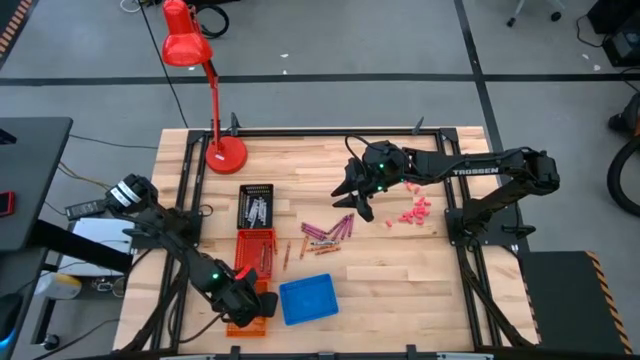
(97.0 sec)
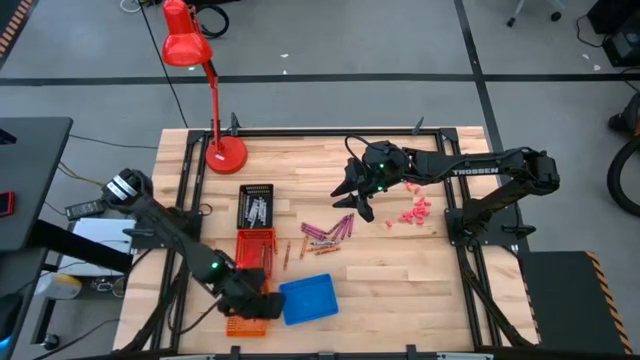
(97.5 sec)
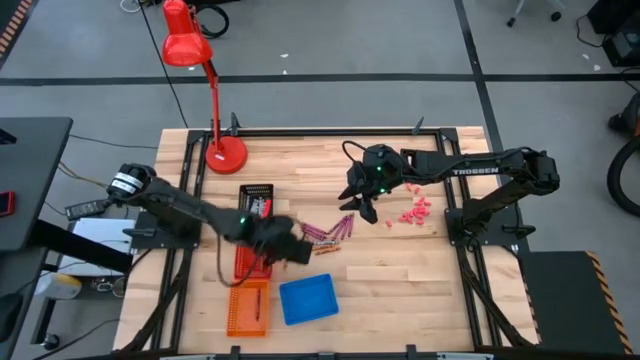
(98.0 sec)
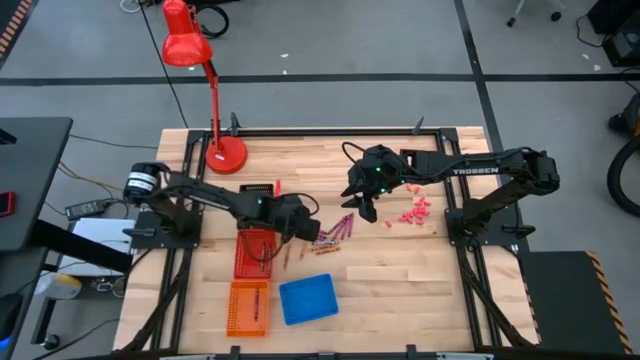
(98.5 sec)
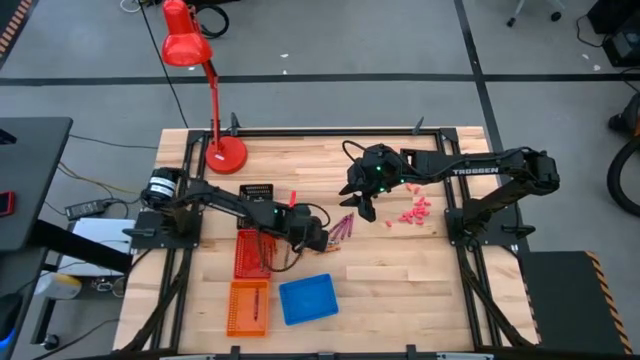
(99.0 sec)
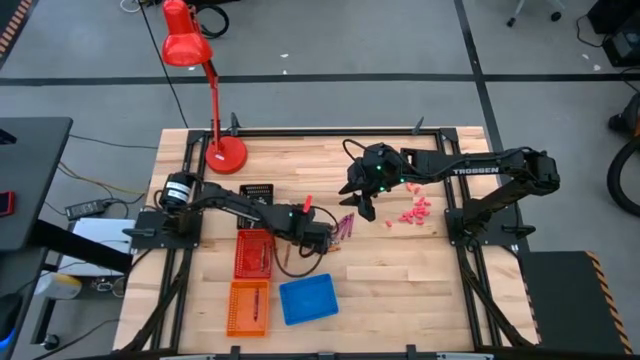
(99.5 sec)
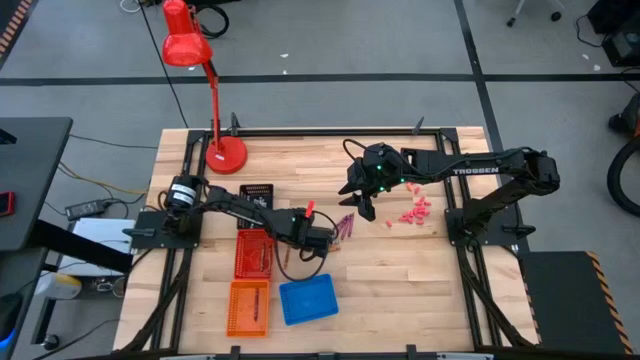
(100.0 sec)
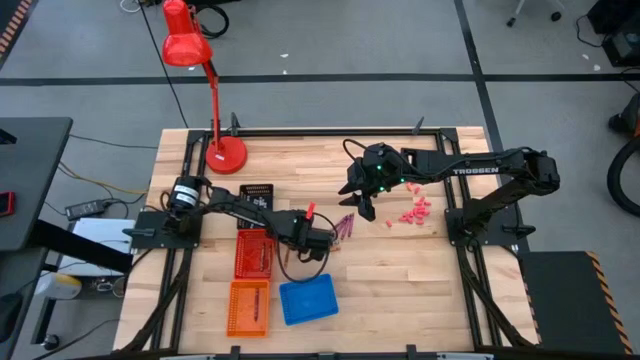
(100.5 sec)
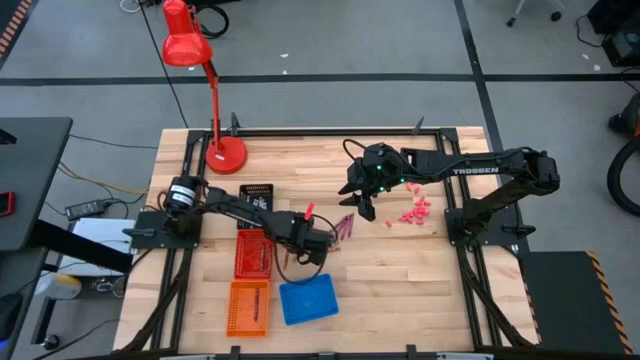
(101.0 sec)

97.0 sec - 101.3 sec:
Task: Sort crayons
Put the orange crayon into the blue bin

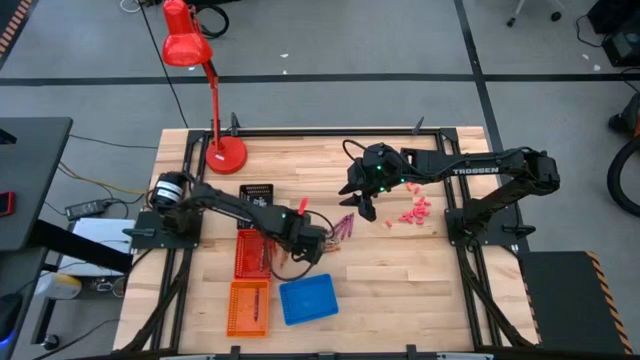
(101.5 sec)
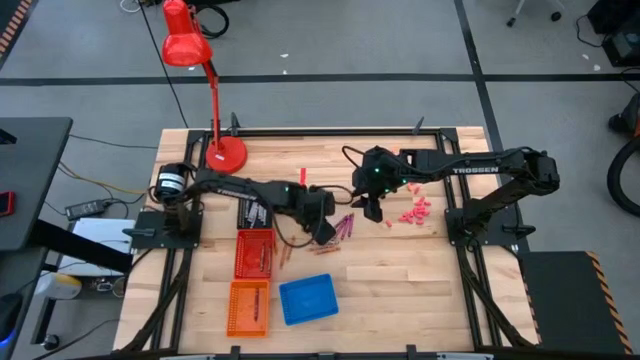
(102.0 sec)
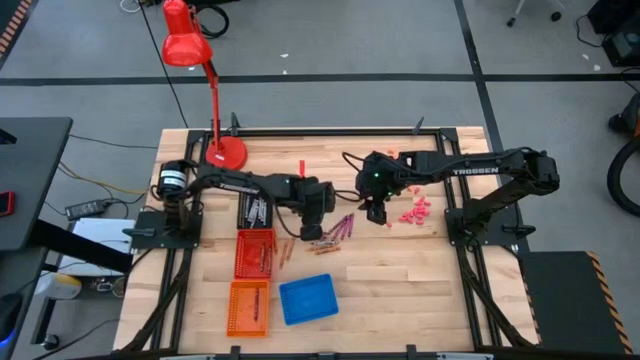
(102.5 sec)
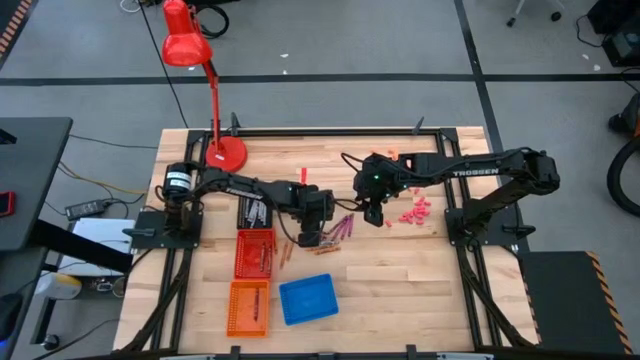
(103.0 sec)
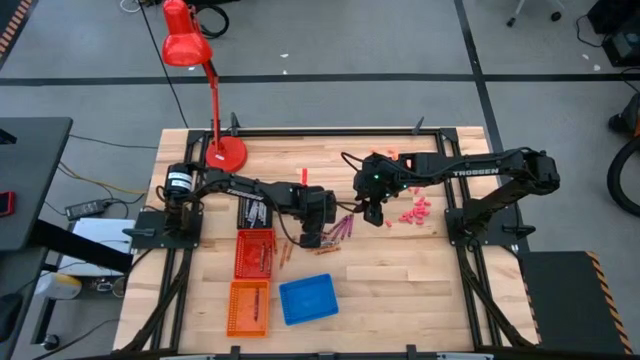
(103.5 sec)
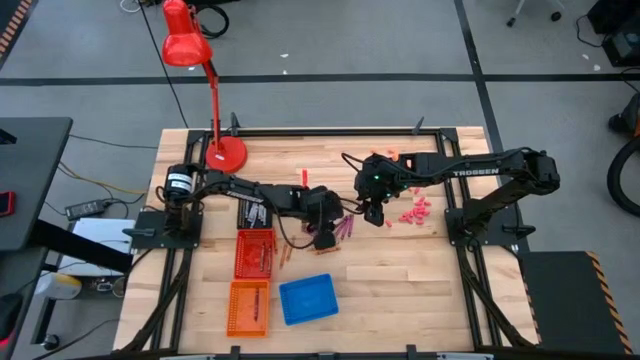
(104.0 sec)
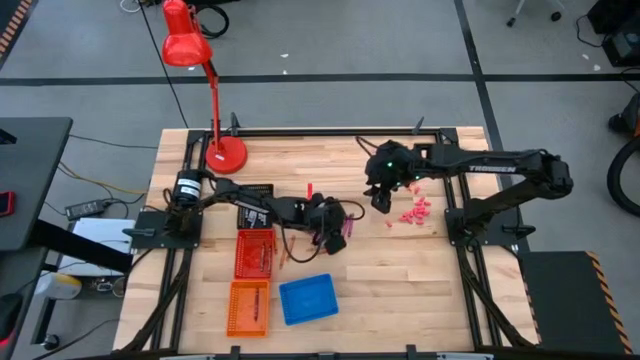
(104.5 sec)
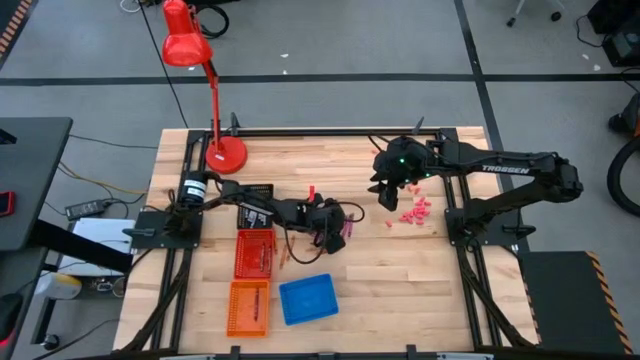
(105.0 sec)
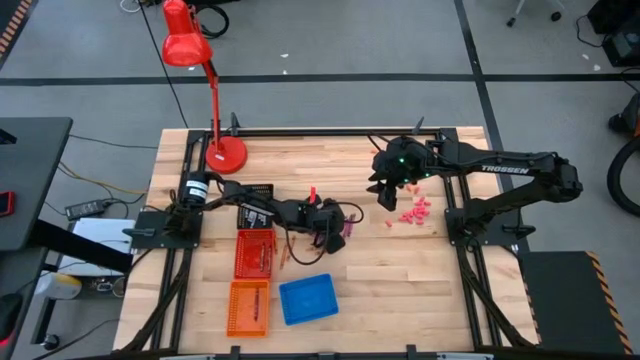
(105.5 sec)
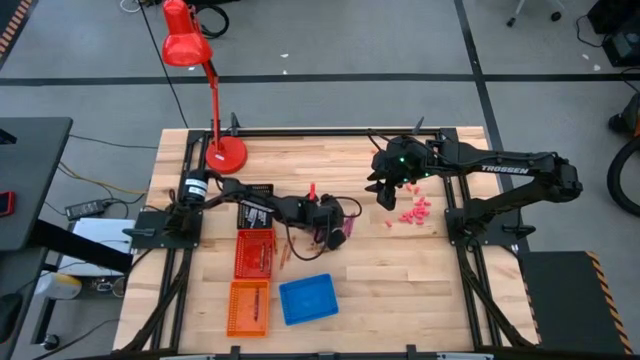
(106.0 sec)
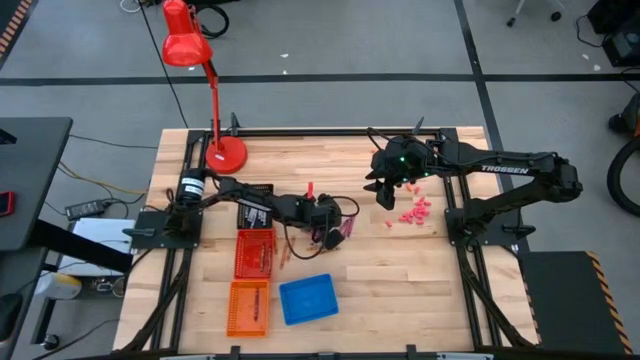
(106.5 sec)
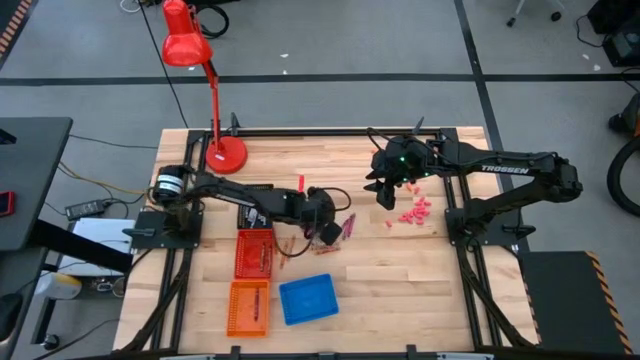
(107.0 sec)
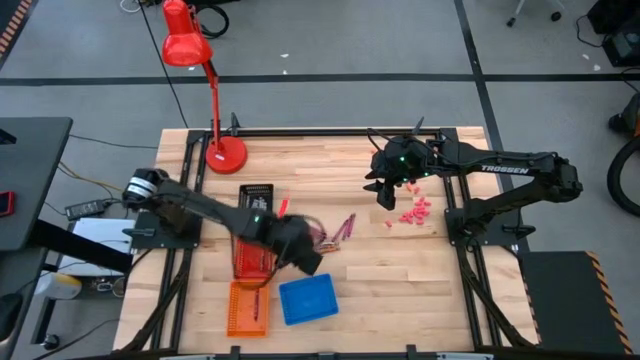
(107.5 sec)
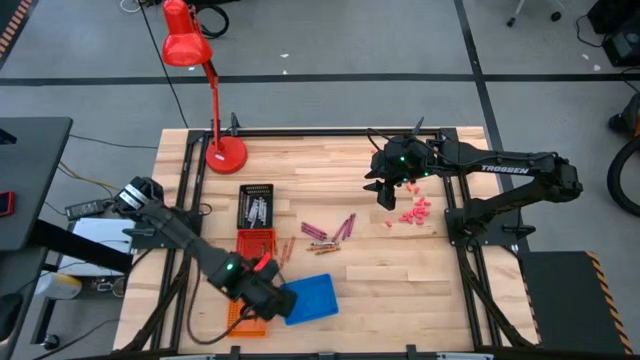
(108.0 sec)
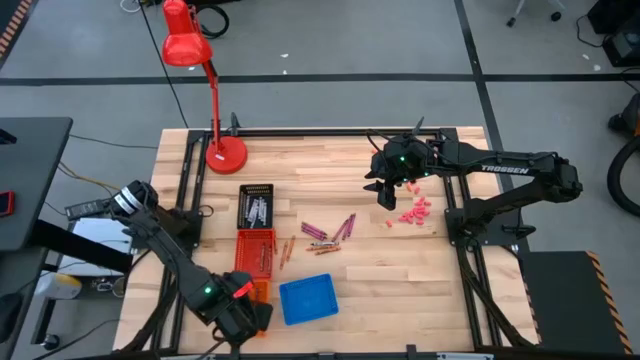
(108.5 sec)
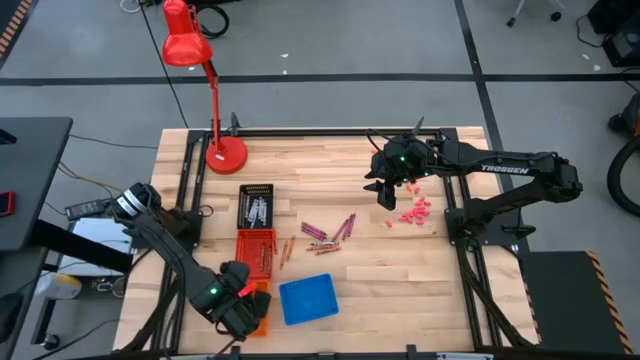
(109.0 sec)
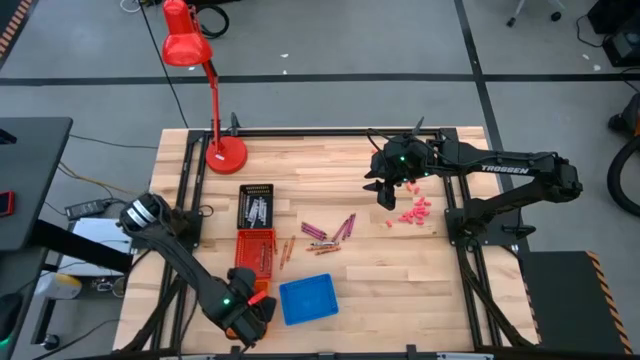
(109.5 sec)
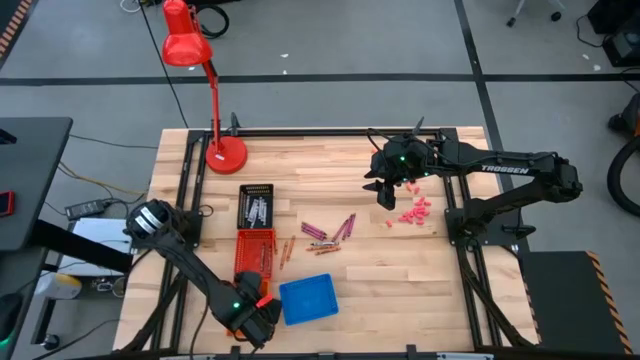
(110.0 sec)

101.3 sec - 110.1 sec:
Put the red crayon into the orange bin

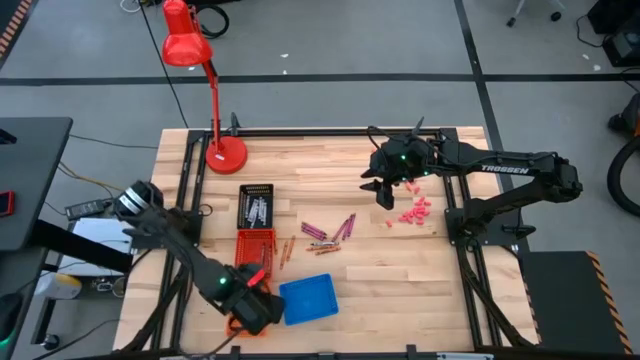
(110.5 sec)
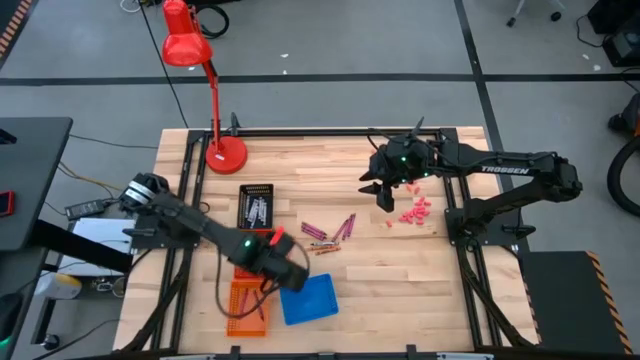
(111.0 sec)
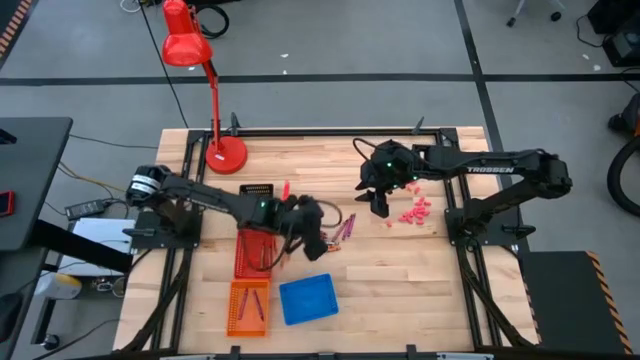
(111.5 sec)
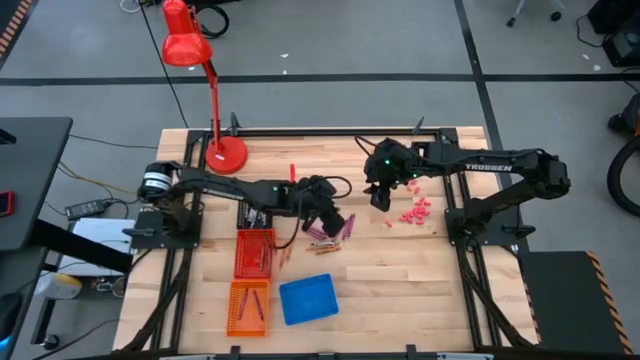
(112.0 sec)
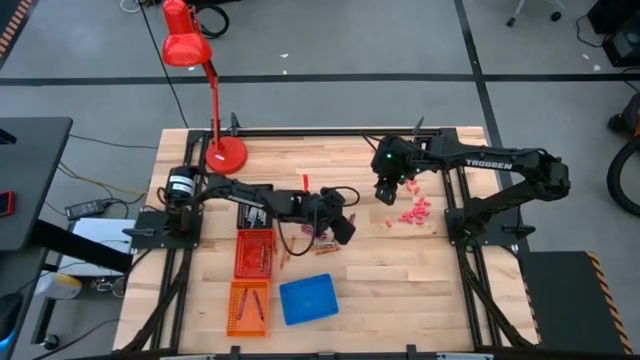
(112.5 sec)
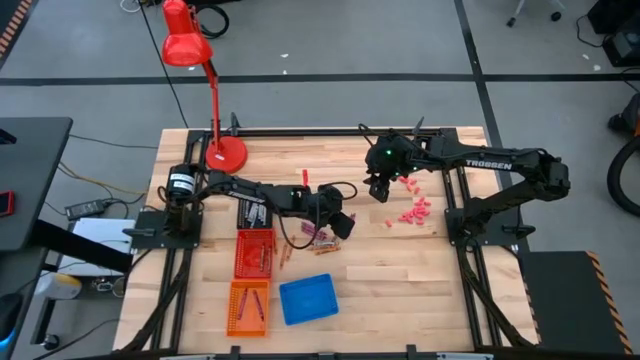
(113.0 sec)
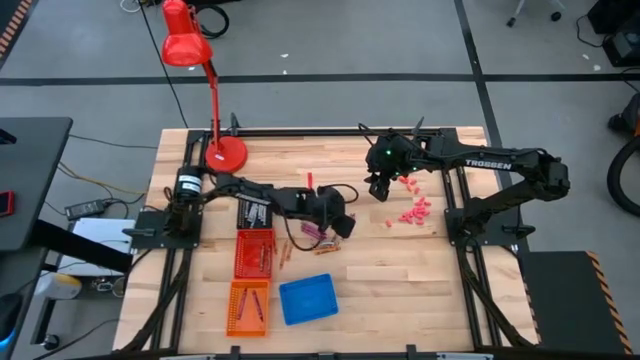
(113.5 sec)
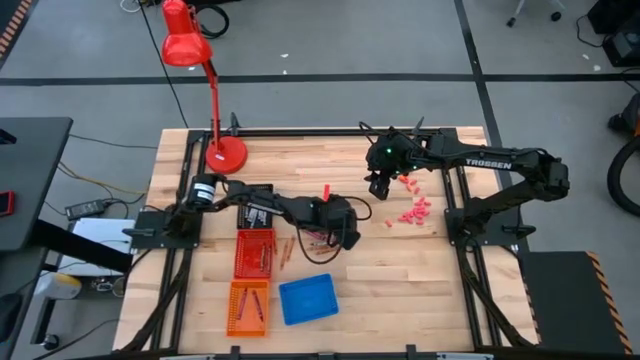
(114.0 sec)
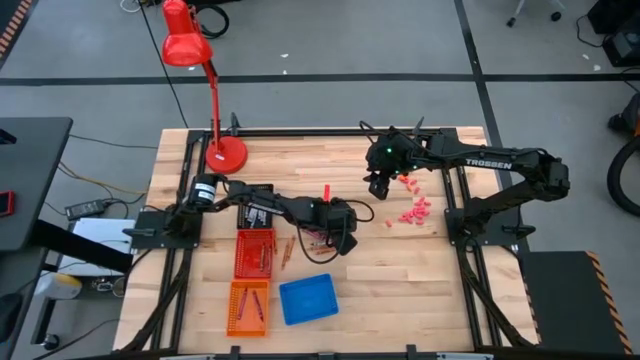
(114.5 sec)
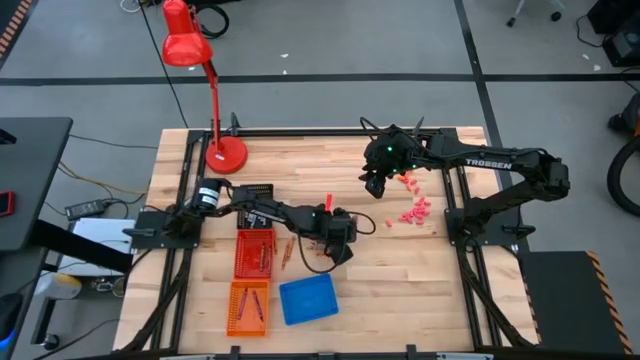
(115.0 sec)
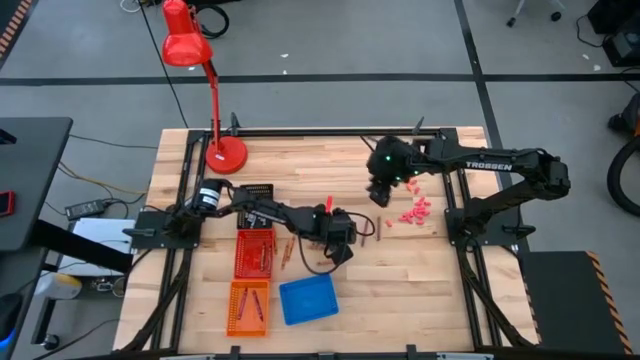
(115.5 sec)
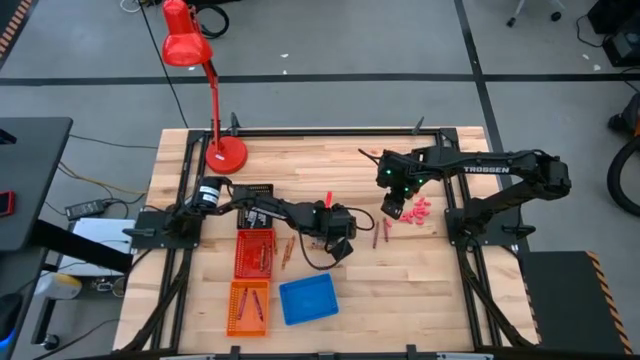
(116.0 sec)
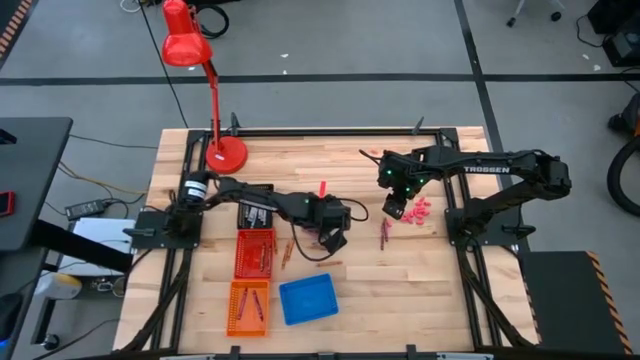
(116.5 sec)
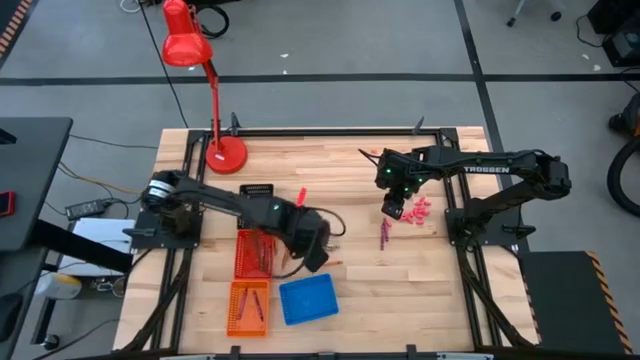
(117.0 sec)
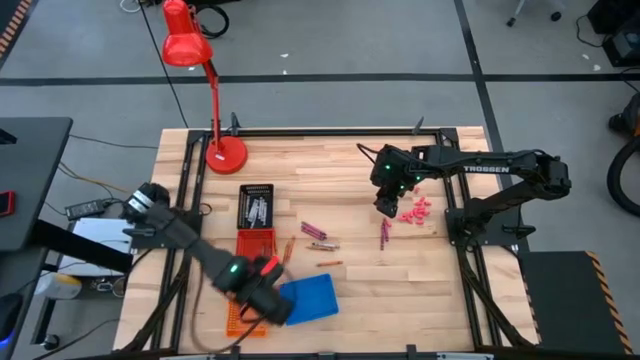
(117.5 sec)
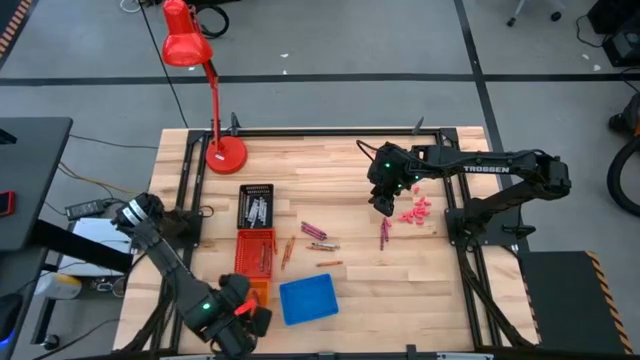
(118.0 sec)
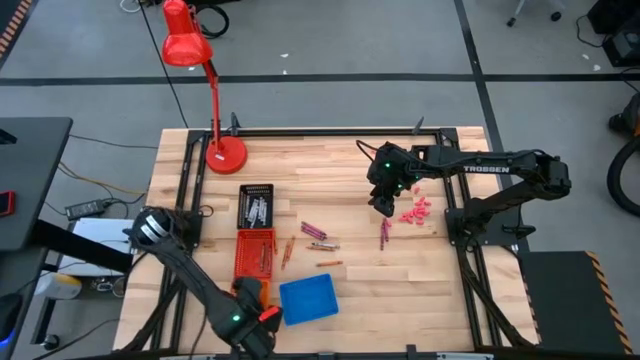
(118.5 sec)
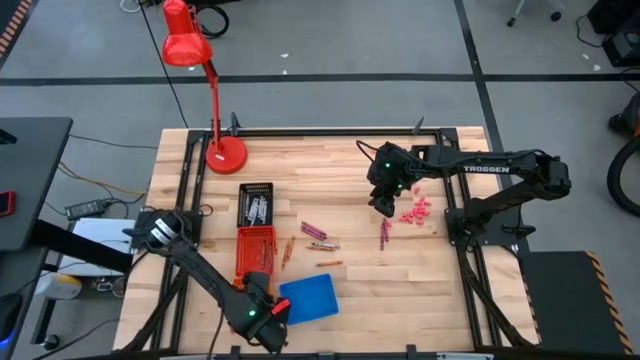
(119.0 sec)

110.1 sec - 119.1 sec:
Put the red crayon into the orange bin
